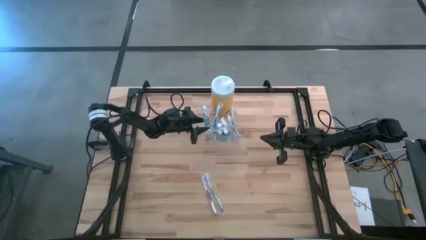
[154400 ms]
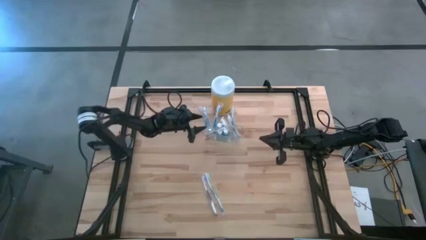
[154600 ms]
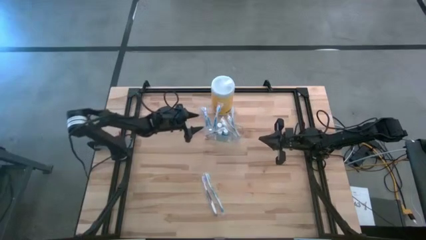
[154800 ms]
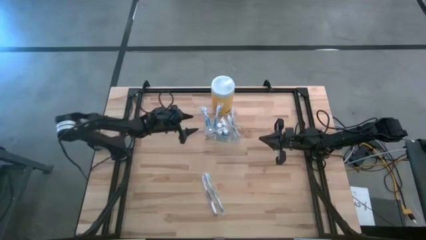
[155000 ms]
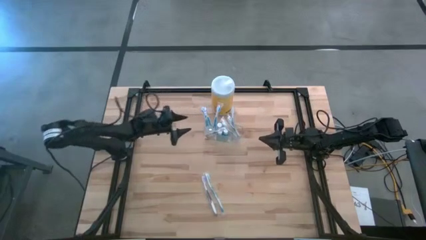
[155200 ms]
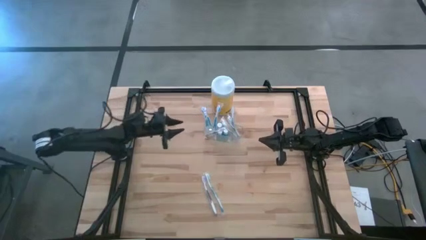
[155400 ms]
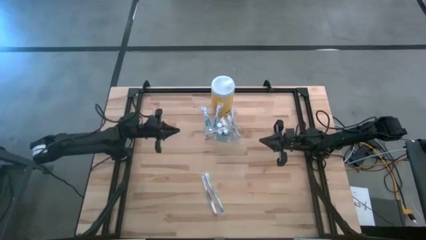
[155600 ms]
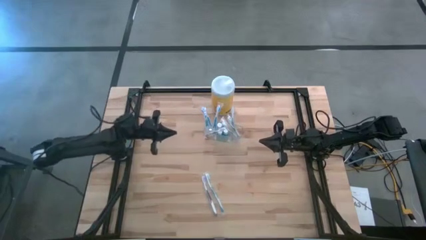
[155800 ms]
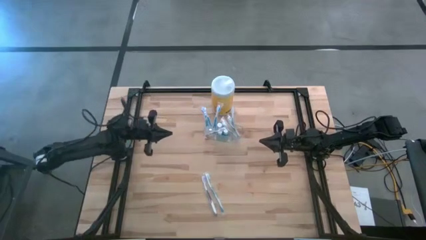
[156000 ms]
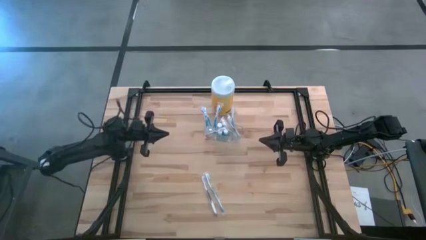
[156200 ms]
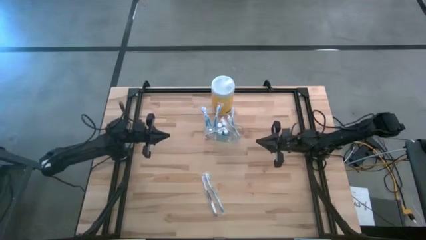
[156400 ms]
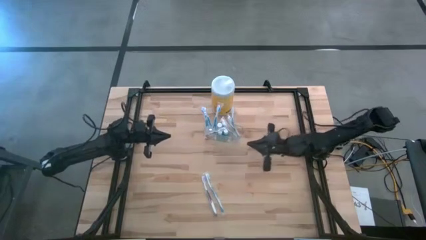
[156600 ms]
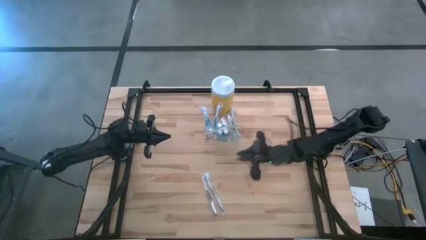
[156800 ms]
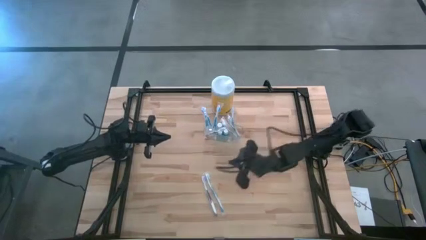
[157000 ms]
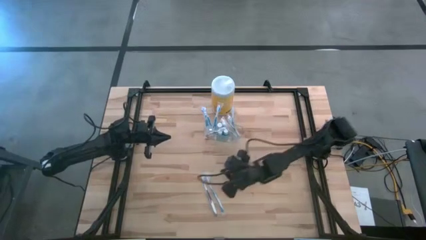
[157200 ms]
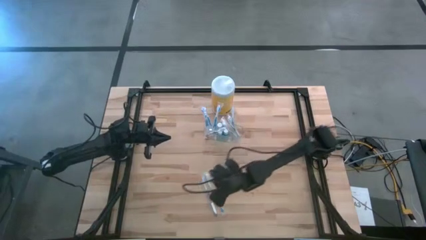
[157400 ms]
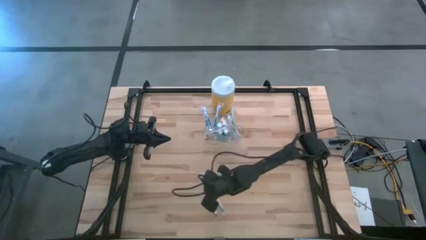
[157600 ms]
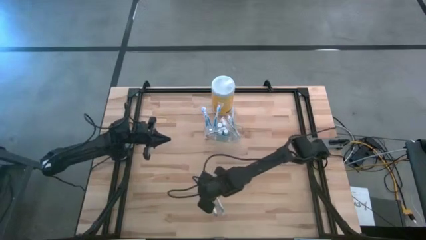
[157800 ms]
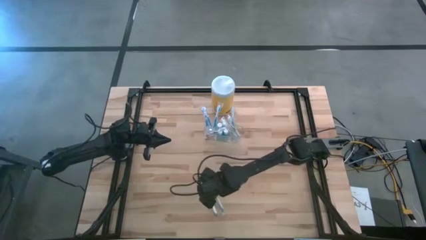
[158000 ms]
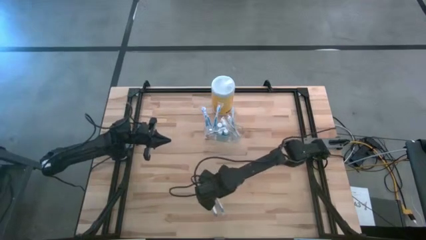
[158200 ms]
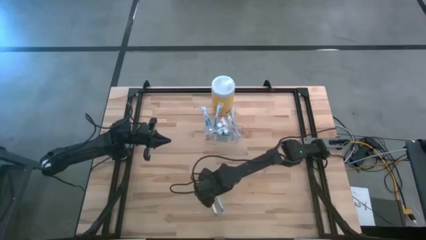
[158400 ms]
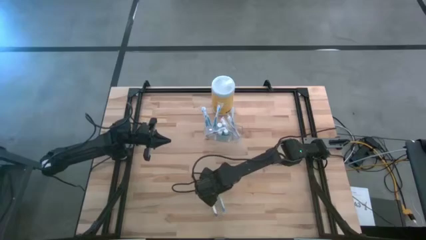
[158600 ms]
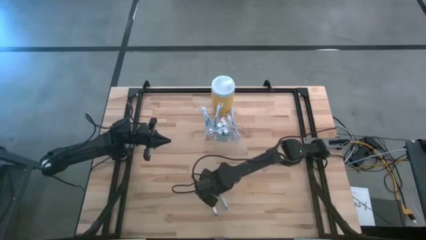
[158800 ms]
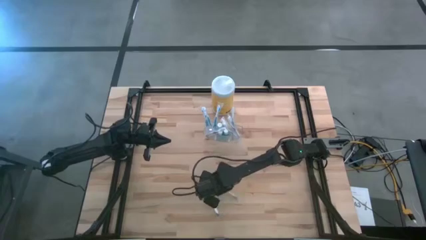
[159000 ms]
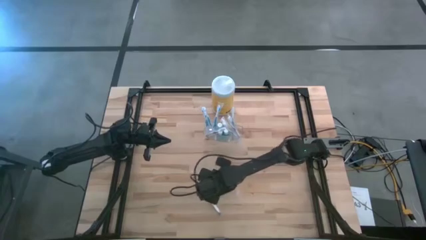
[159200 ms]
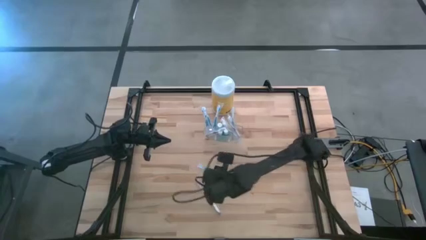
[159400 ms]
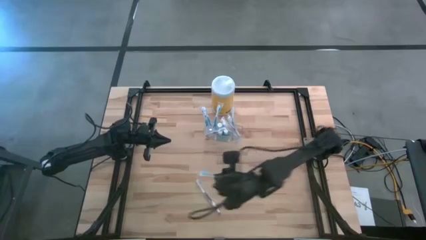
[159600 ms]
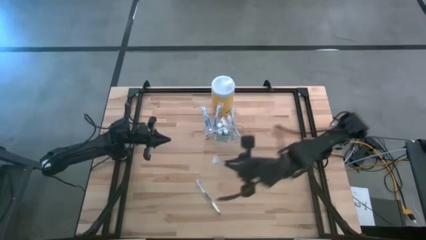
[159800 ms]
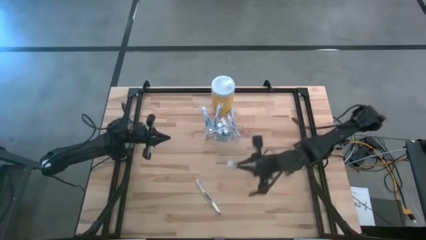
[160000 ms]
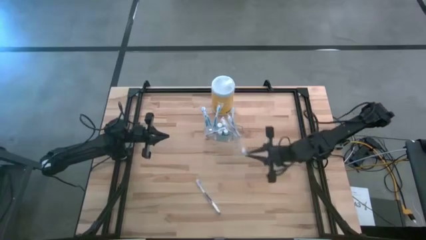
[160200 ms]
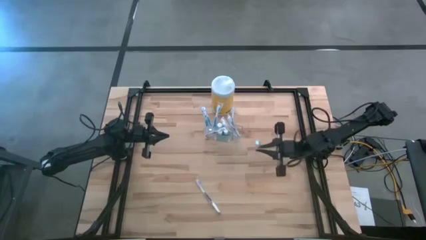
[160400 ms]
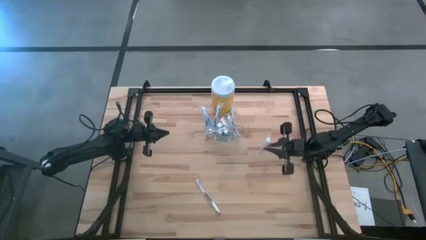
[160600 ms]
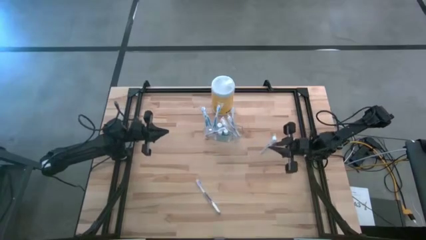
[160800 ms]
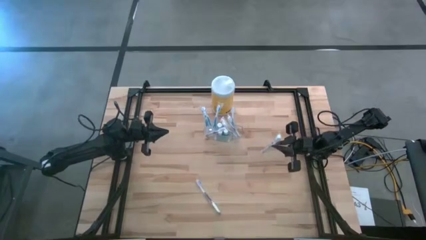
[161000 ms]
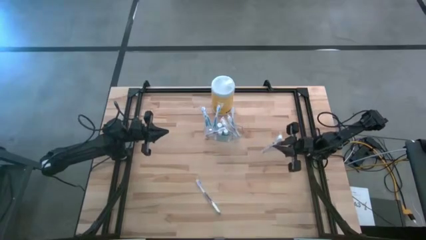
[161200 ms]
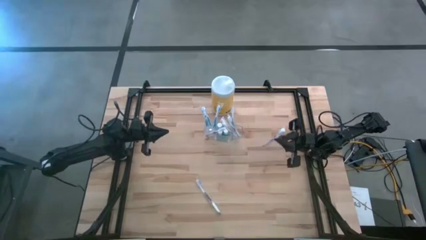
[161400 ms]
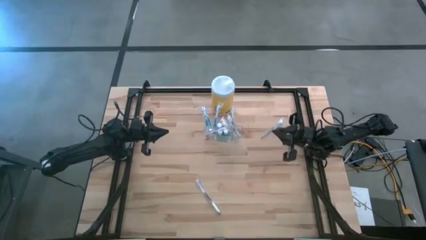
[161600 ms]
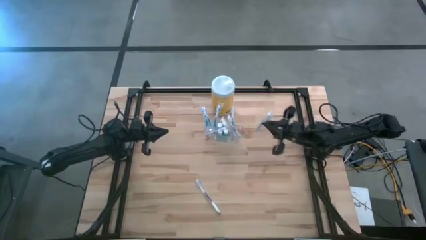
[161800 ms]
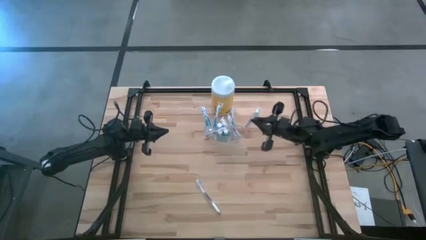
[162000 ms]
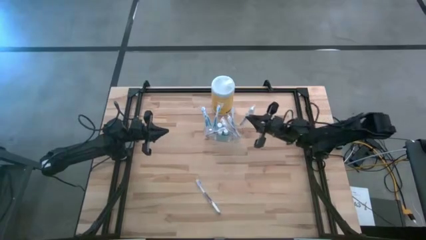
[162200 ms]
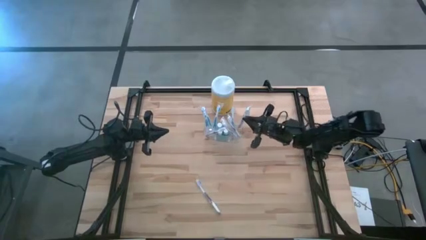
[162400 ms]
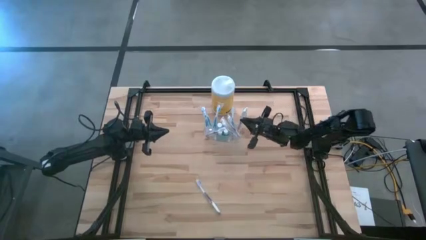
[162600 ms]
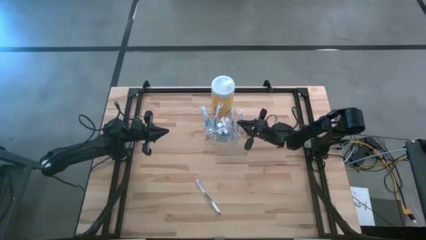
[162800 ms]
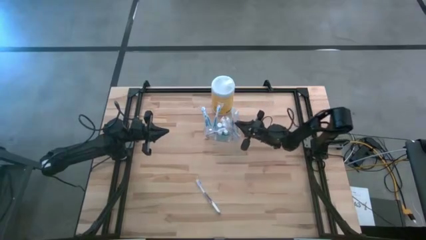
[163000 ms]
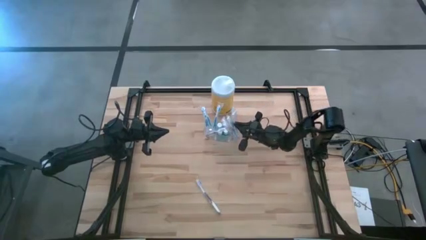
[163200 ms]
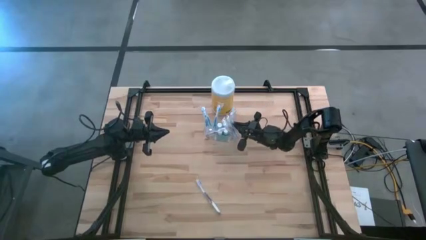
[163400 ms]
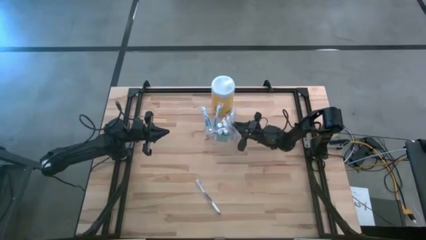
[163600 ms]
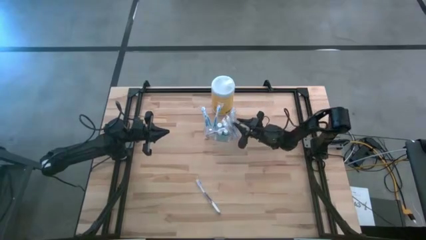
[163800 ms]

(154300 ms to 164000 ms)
Task: Pick & Place toothbrushing station
Put the blue toothbrush into the transparent organizer

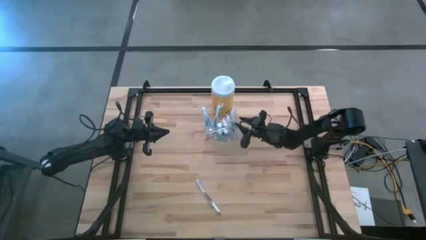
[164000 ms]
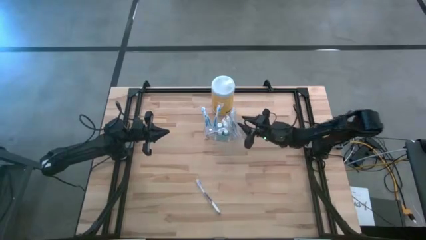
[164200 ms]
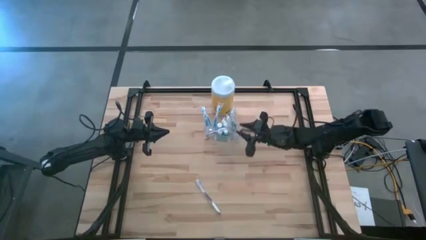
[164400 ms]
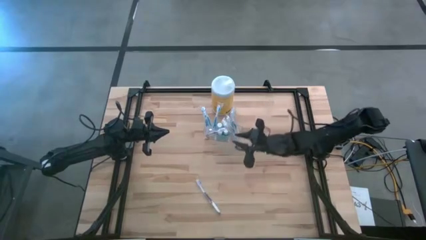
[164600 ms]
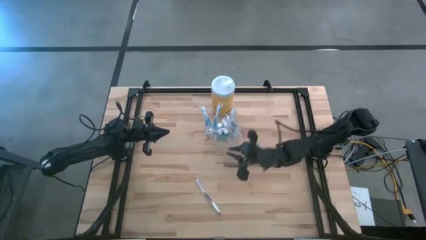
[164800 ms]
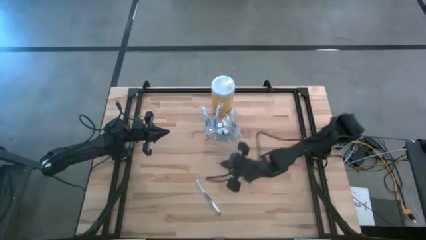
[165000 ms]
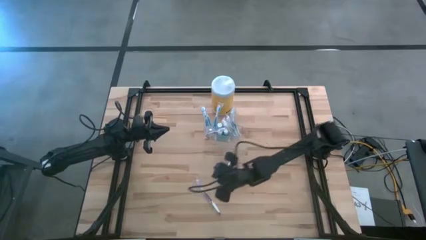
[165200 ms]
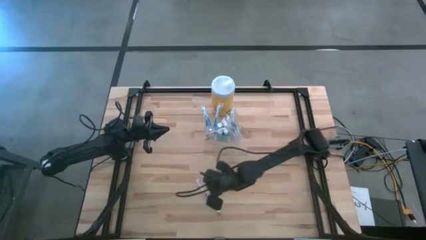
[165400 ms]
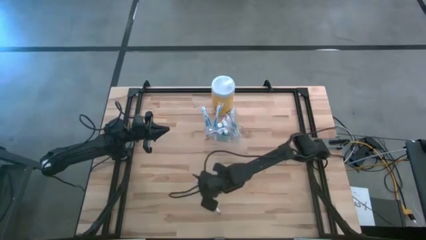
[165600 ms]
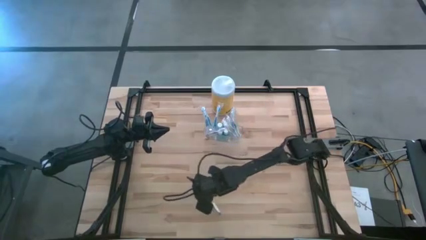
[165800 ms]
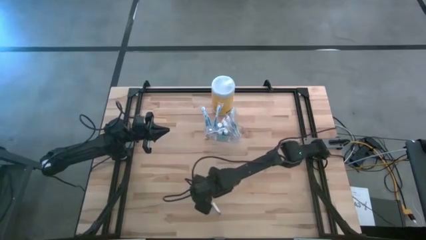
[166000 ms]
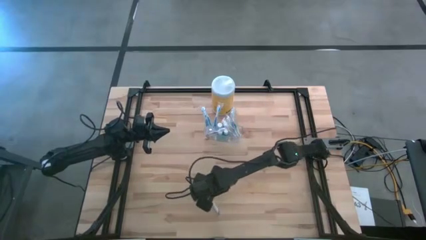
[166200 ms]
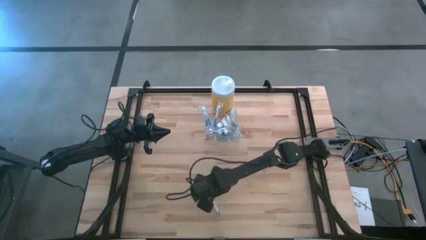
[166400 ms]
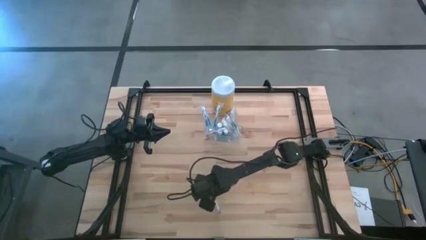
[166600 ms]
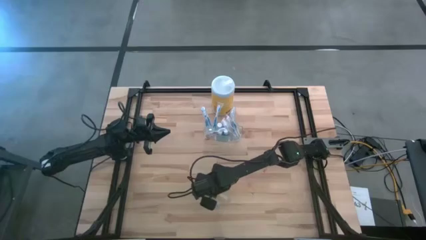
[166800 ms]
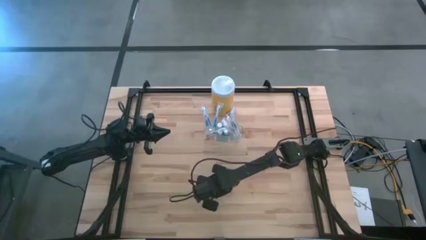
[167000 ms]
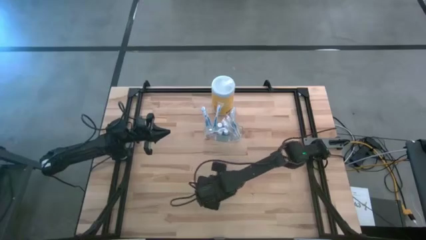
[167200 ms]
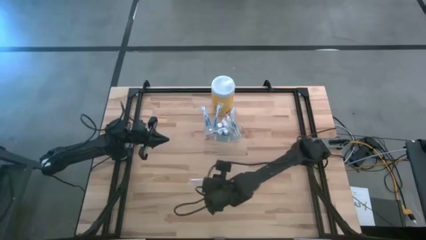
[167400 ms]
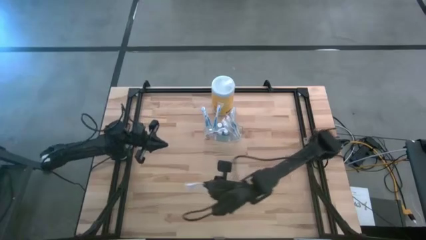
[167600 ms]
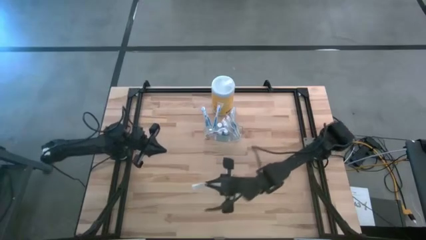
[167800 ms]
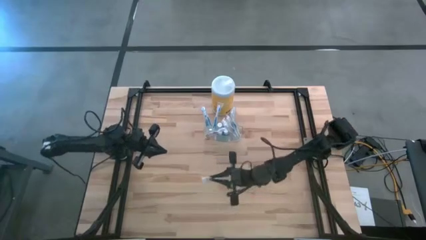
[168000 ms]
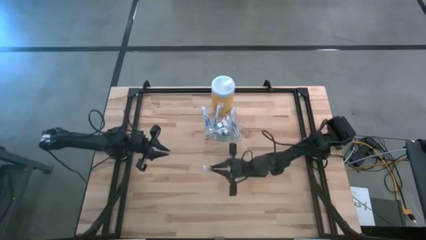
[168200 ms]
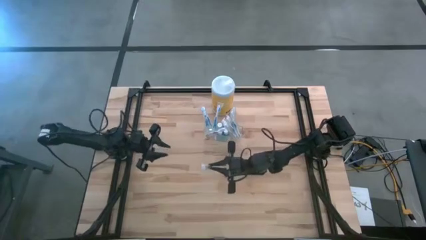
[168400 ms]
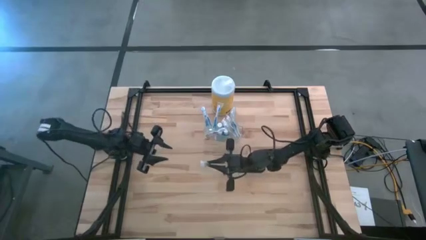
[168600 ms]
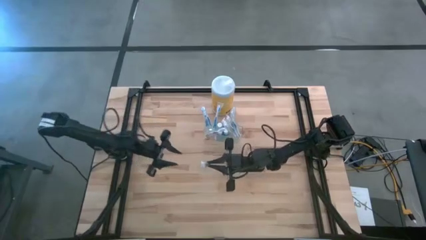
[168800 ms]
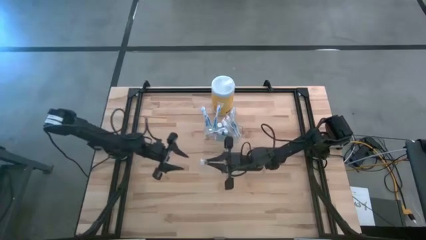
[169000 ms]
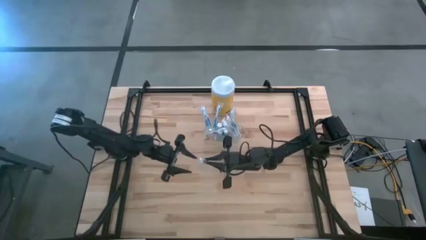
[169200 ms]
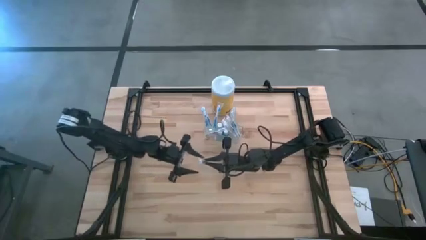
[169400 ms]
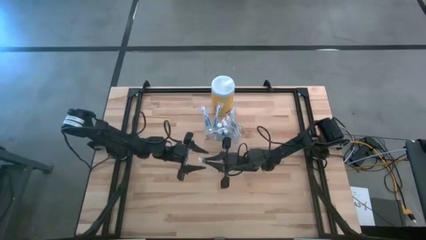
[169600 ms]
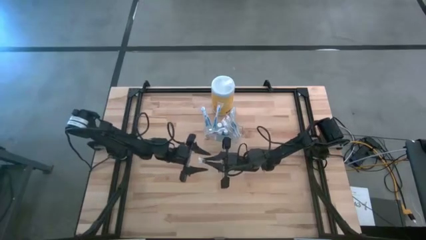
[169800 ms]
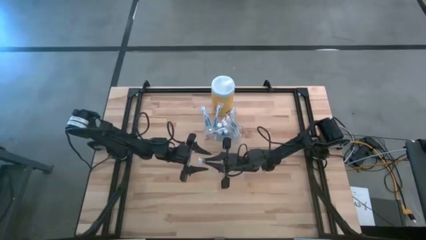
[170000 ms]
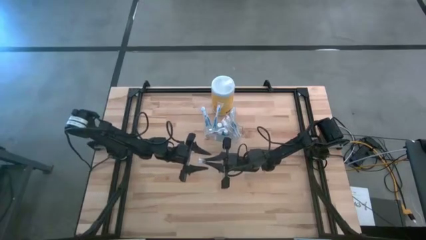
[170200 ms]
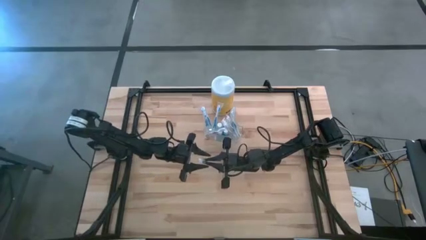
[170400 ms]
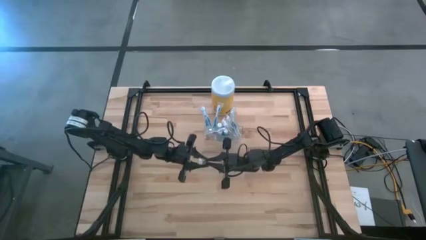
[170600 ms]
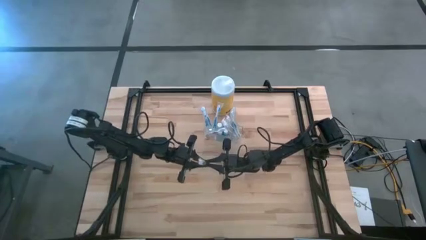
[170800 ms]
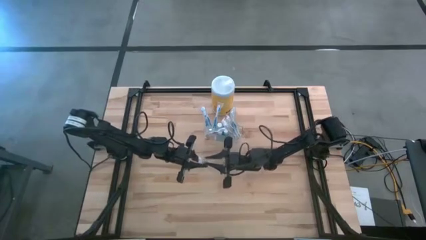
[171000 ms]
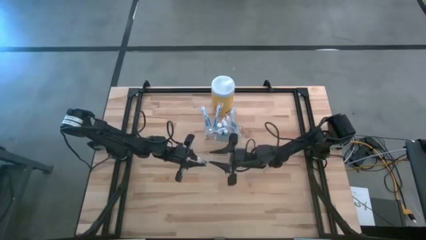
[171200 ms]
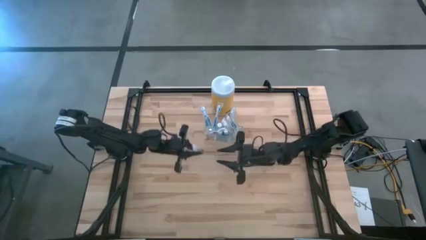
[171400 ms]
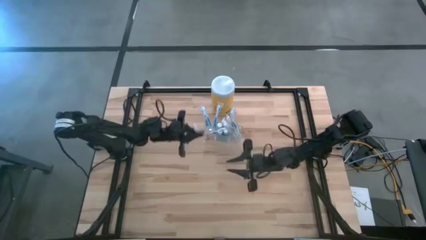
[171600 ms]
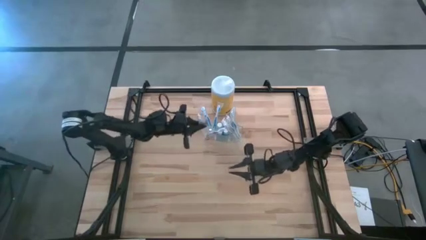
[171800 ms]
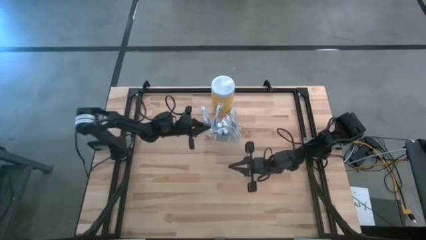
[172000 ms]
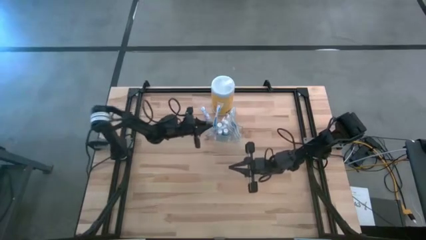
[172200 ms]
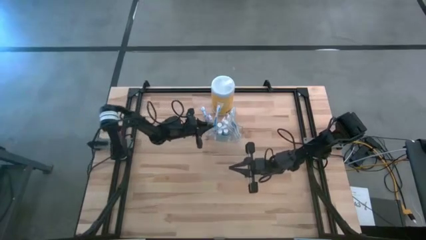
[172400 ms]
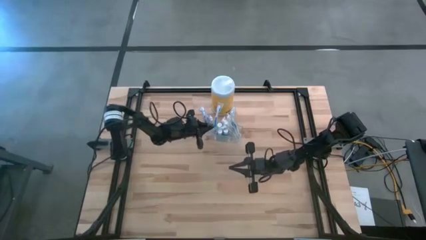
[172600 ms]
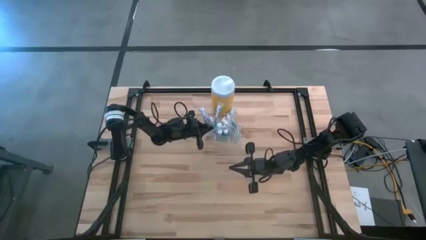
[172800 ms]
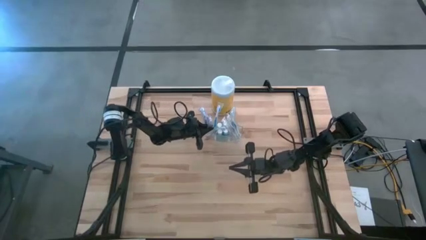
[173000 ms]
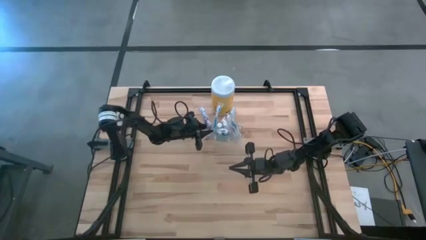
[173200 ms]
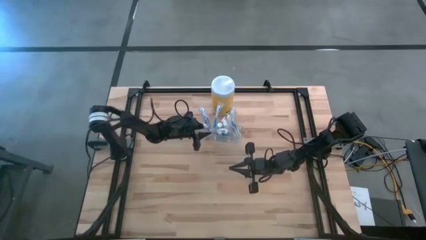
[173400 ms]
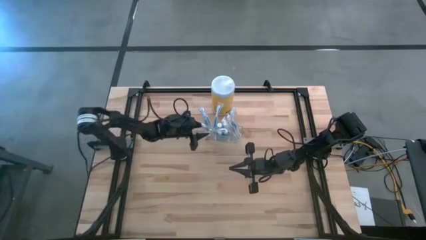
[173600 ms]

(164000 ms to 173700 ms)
Put the violet toothbrush into the transparent organizer
